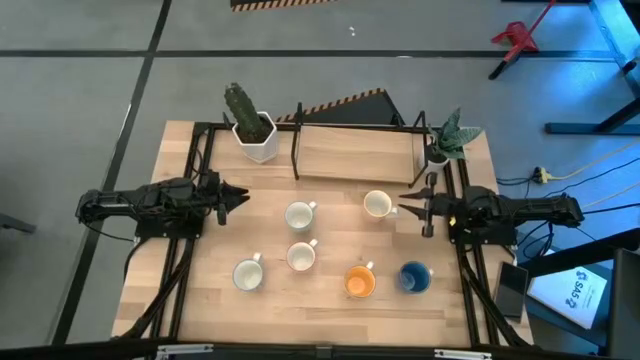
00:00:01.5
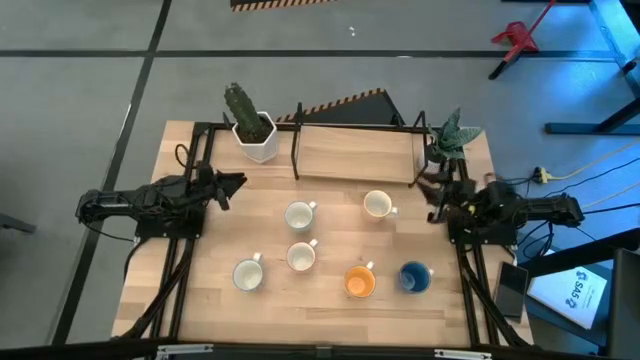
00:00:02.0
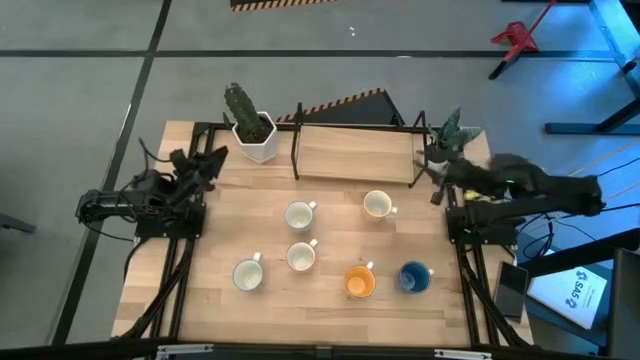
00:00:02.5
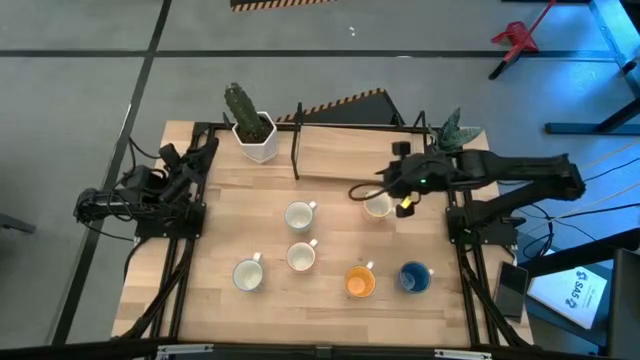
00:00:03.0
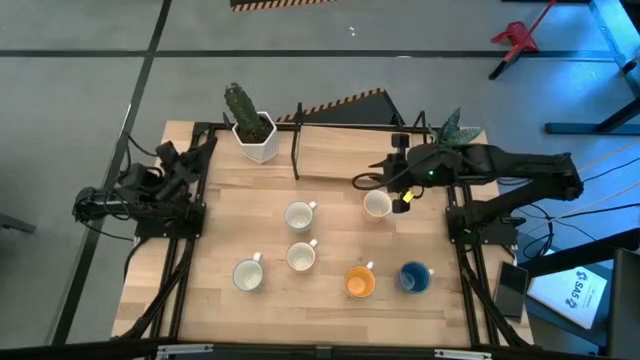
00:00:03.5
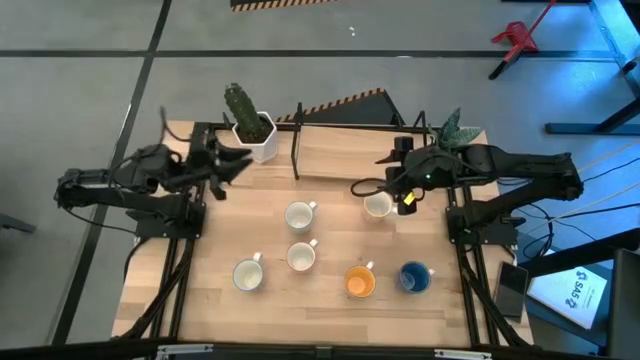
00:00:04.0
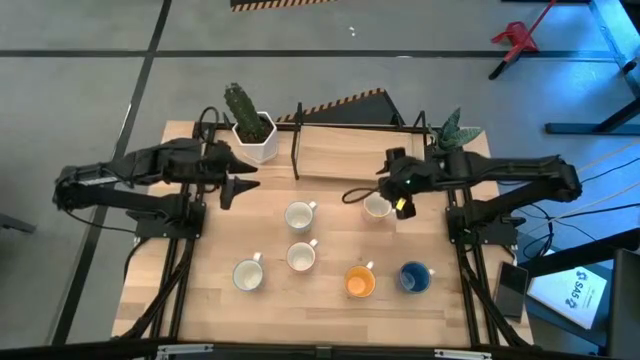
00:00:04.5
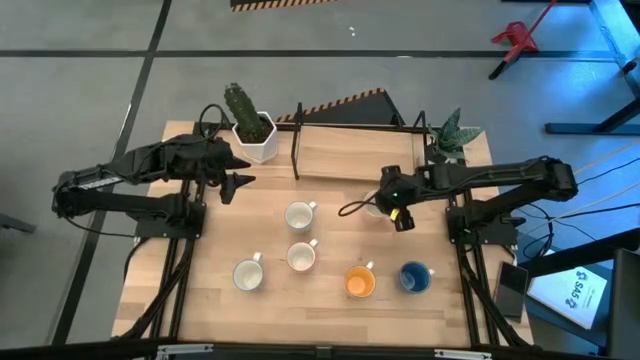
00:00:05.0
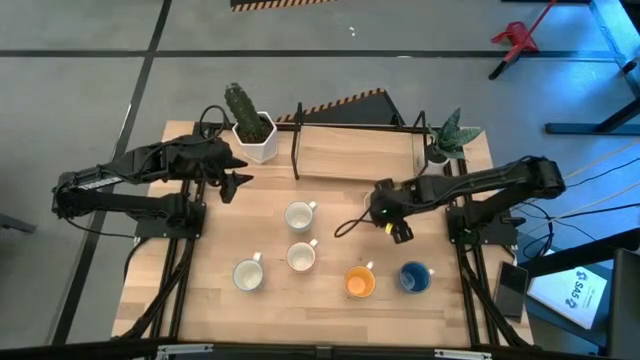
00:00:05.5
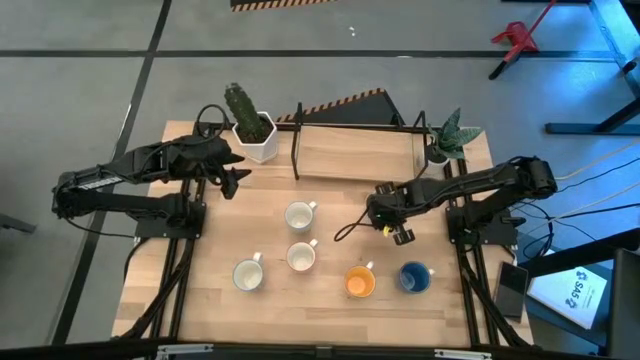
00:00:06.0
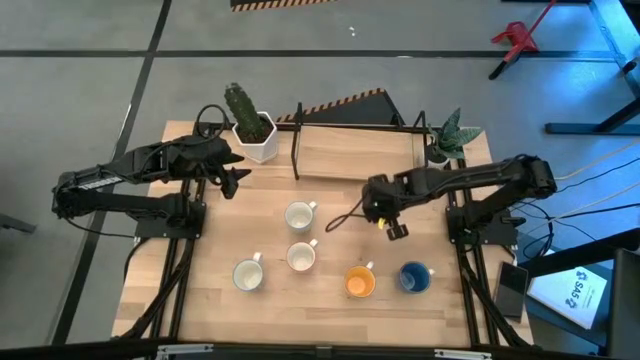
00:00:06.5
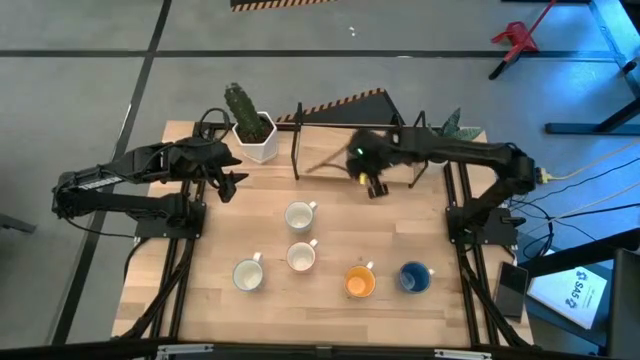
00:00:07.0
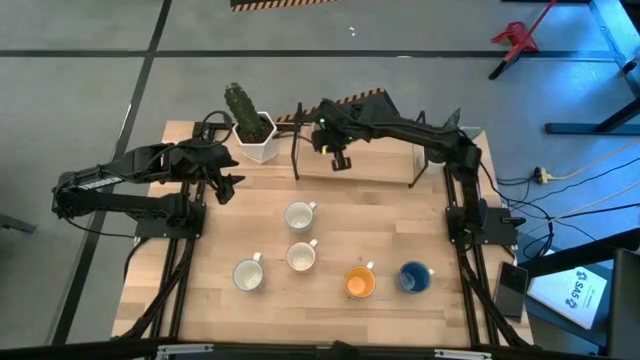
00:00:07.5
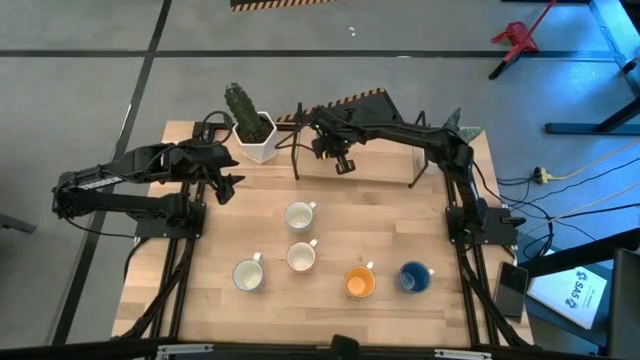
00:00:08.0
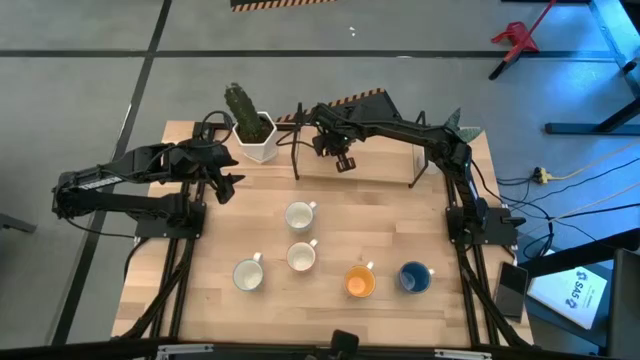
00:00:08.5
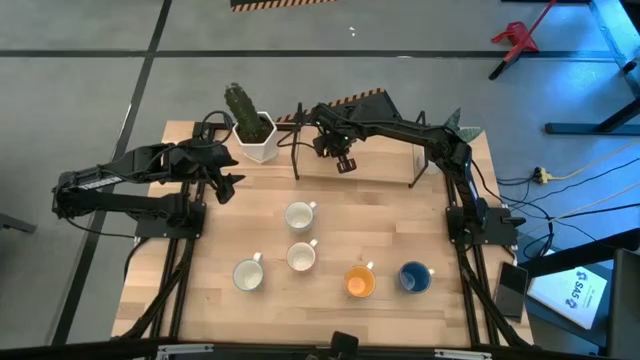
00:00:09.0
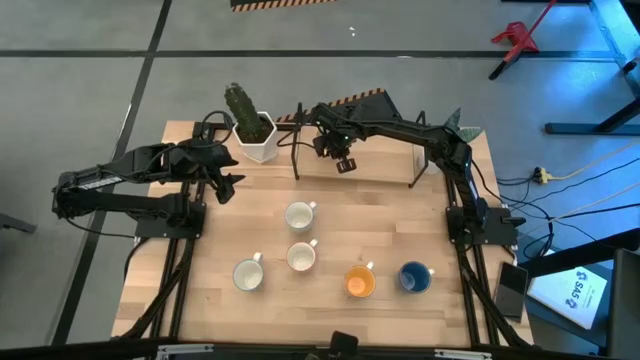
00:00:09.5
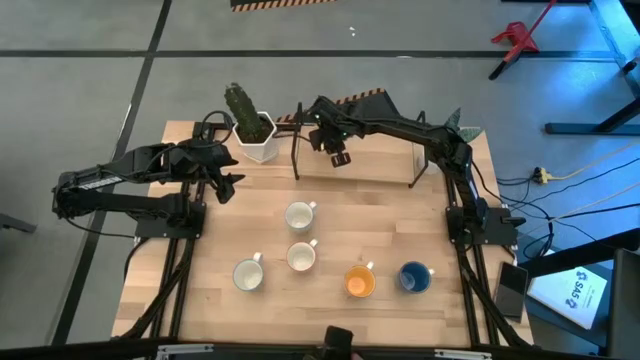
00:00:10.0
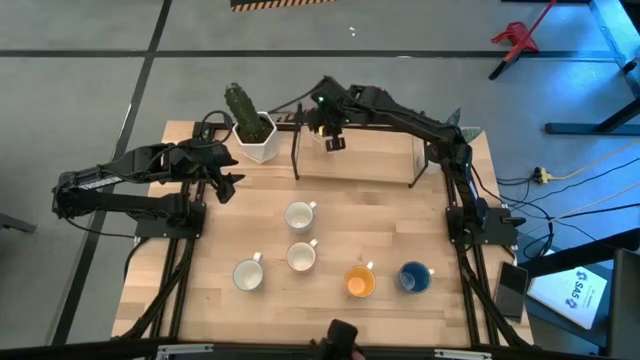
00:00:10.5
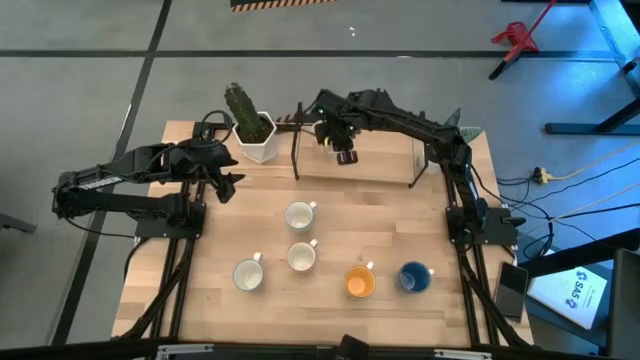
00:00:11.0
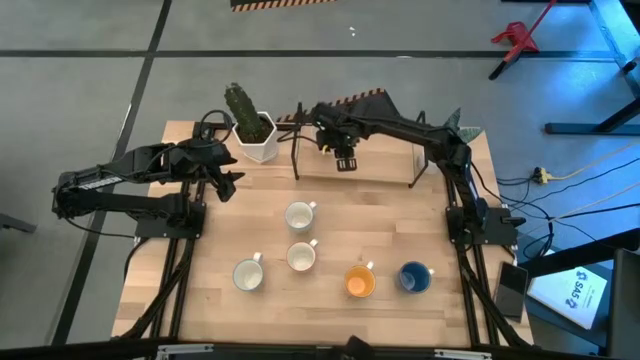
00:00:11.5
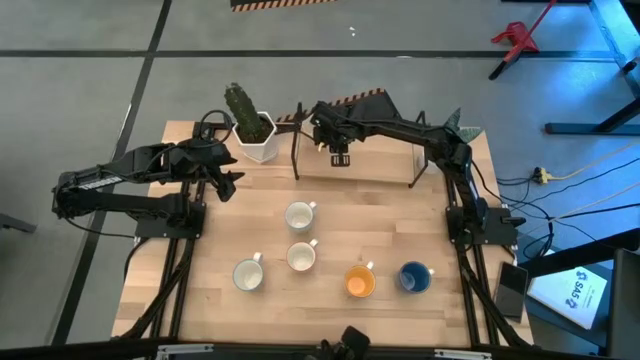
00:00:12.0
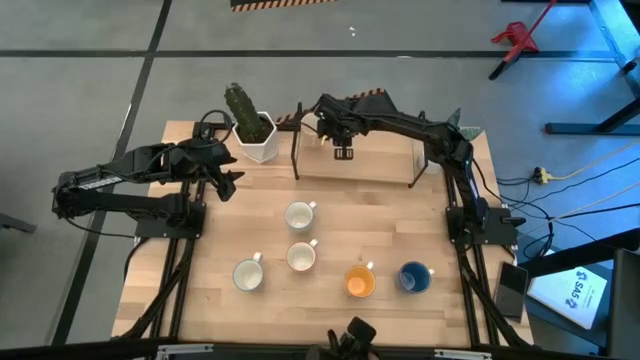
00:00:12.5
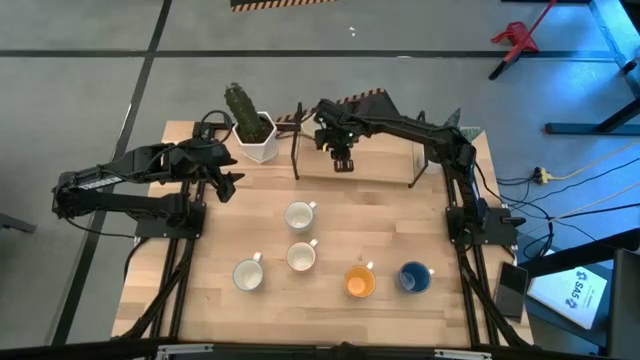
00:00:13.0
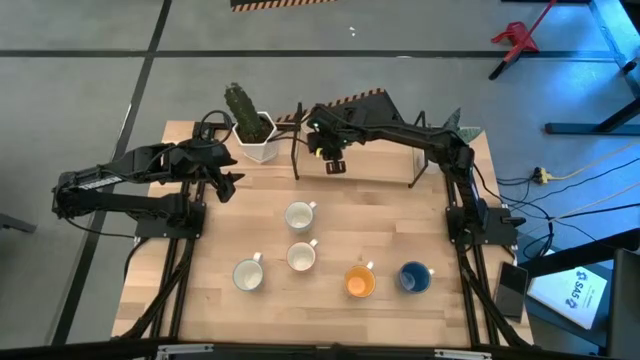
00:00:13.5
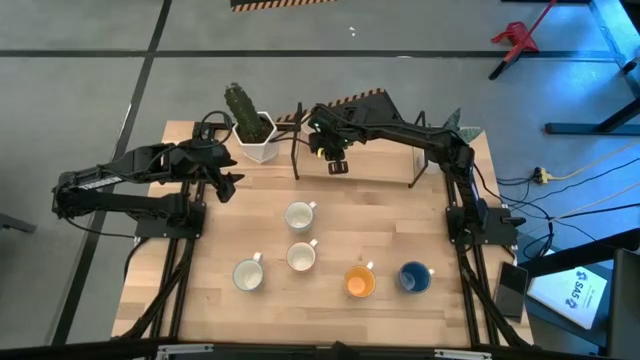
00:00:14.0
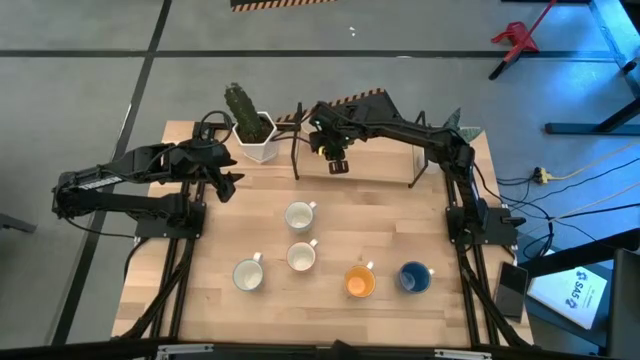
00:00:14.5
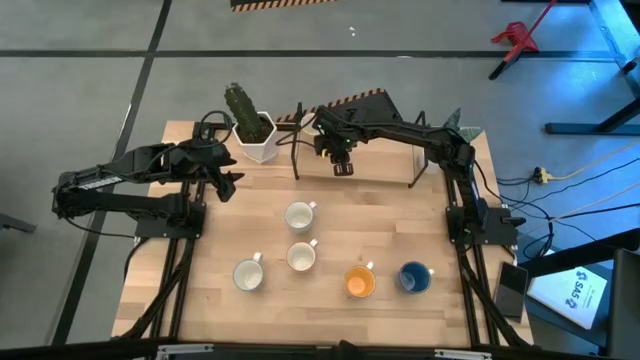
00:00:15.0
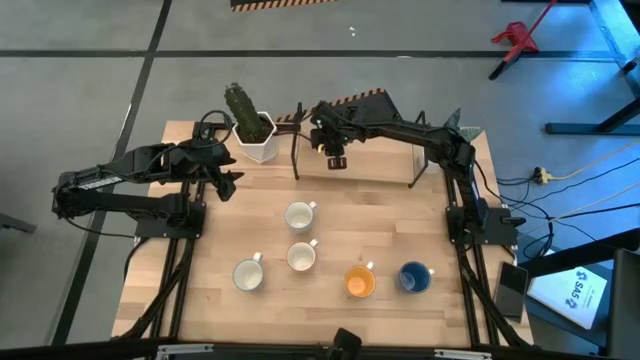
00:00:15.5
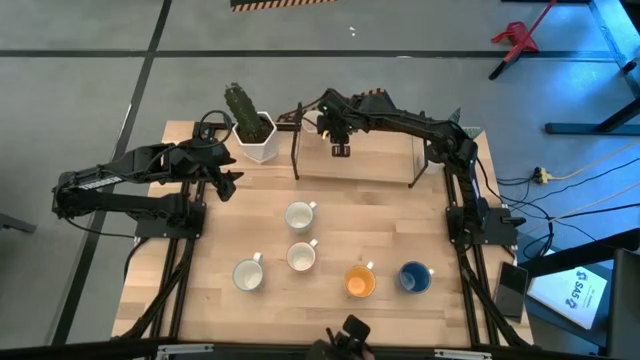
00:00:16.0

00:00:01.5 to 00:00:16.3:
Task: Place coffee mugs
Put the orange yellow patterned mug into the shelf

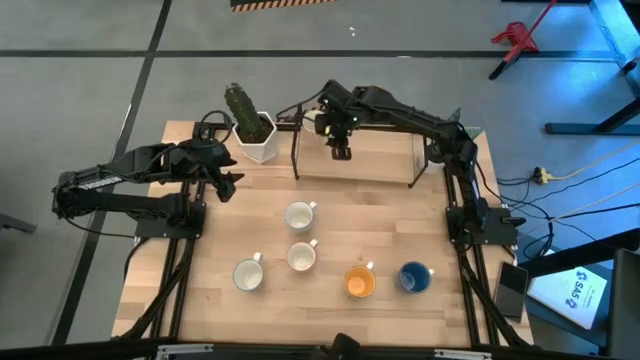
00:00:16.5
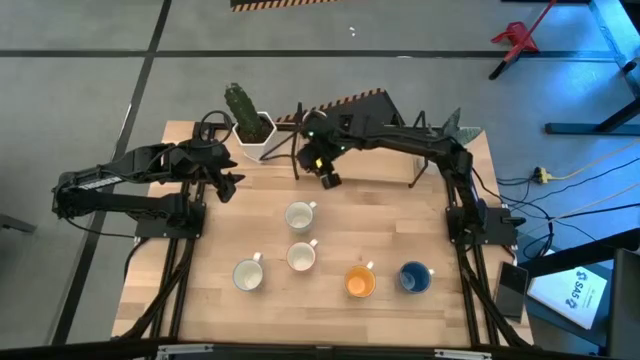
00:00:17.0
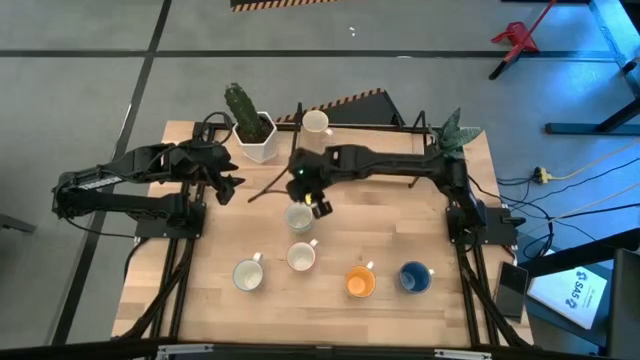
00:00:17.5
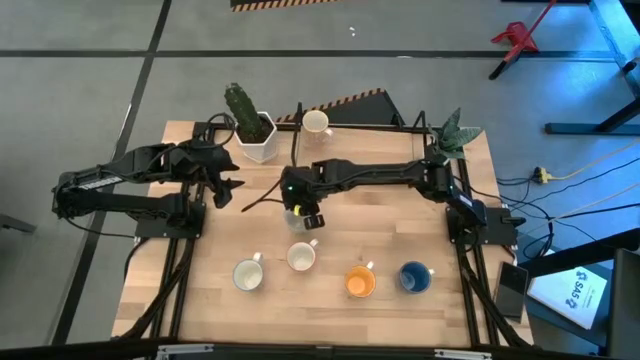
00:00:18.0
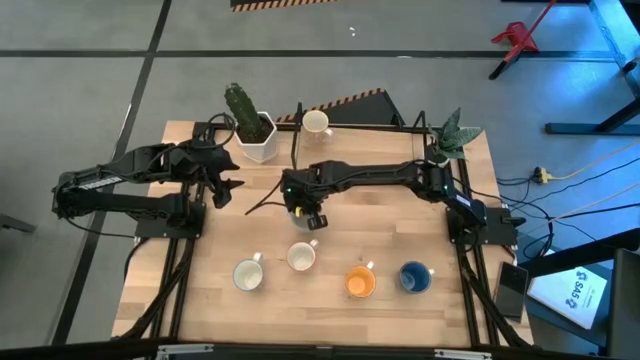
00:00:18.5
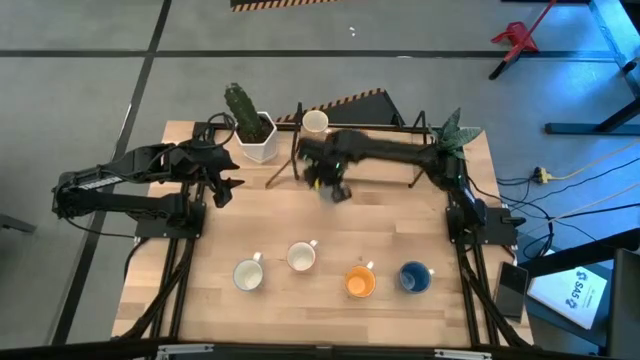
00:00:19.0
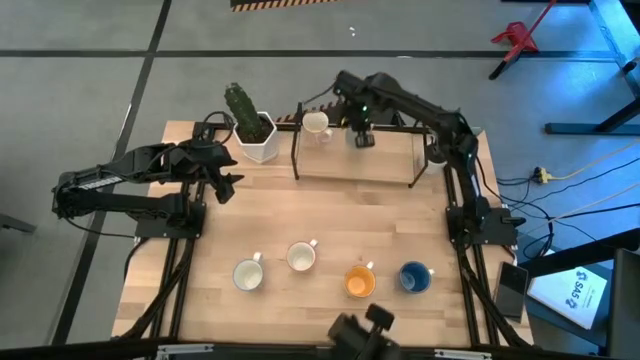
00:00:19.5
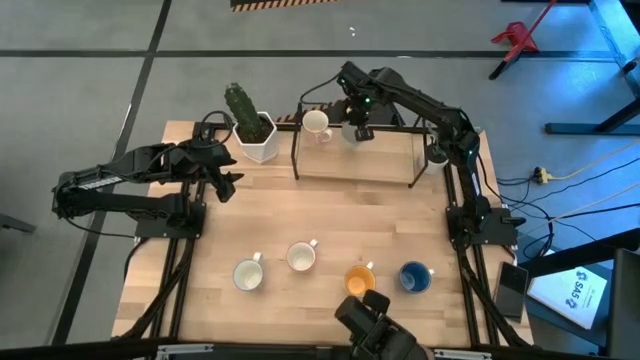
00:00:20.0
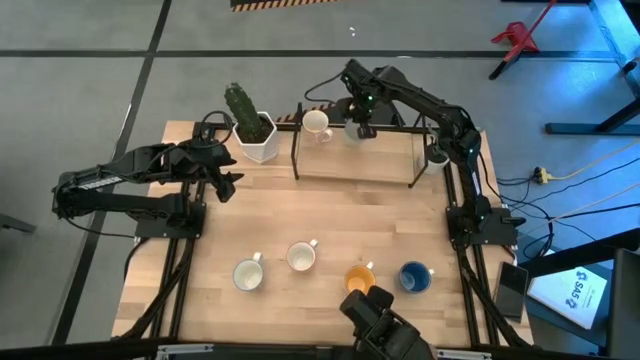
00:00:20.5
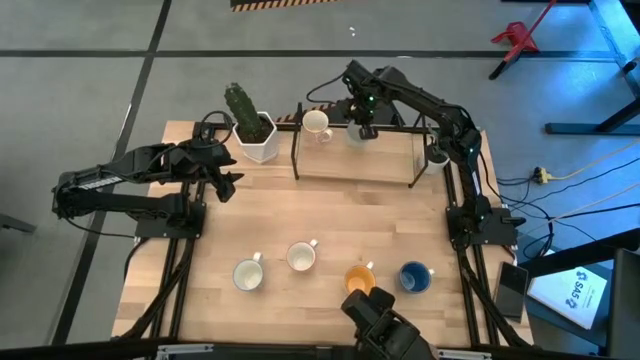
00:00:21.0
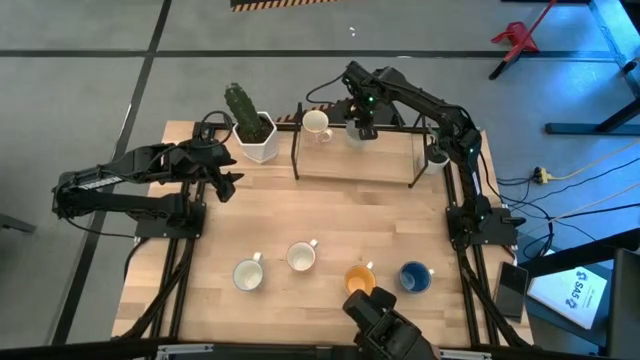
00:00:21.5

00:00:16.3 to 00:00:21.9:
Put the blue green patterned mug into the shelf

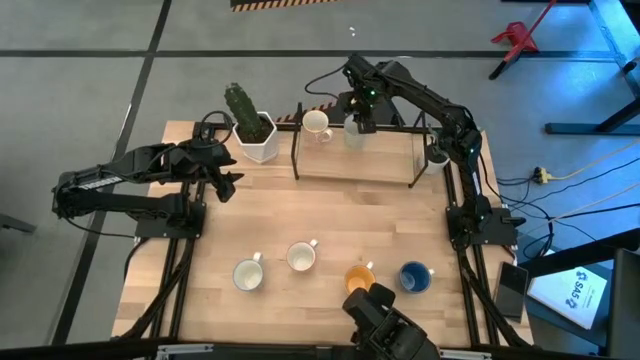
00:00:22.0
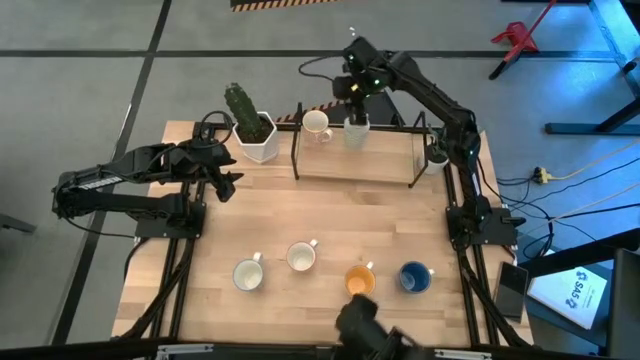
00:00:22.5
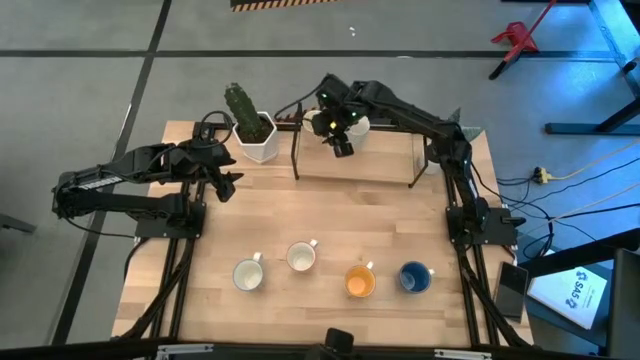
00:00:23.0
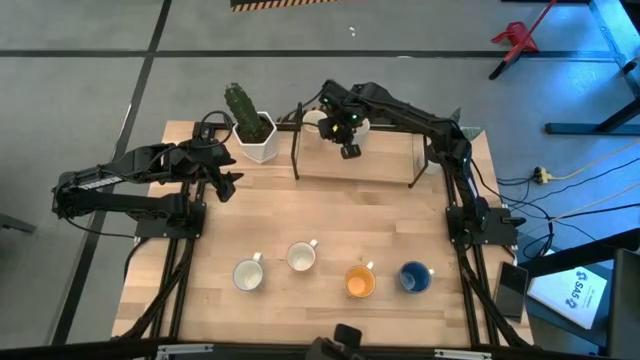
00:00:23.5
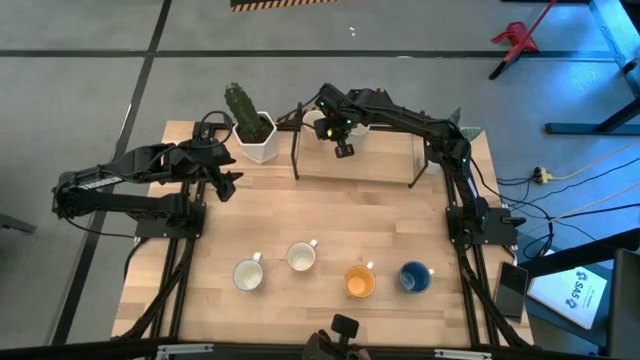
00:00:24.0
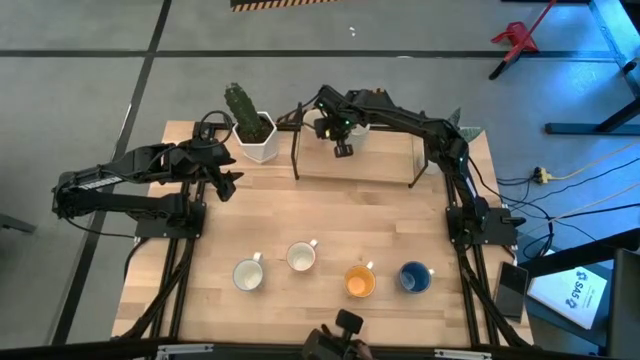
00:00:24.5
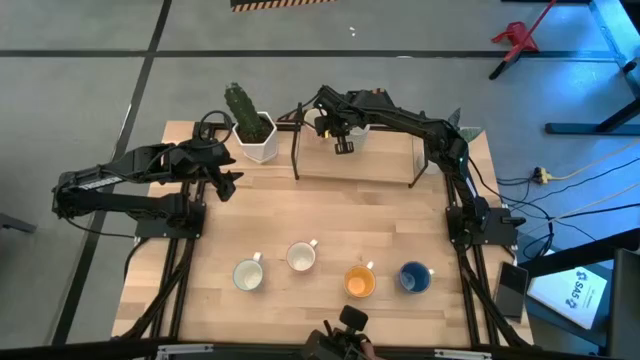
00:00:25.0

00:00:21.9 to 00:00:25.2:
Adjust the orange yellow patterned mug into the shelf
